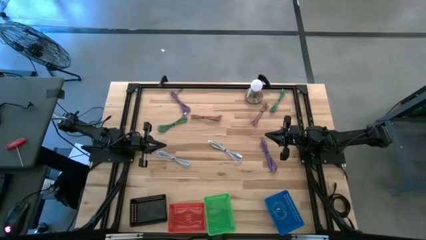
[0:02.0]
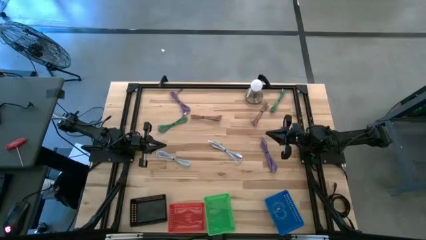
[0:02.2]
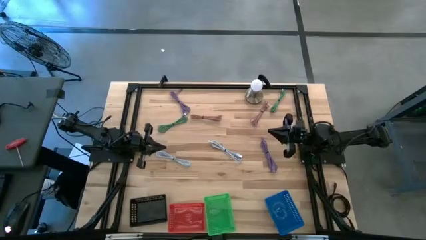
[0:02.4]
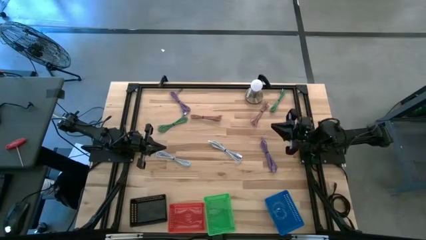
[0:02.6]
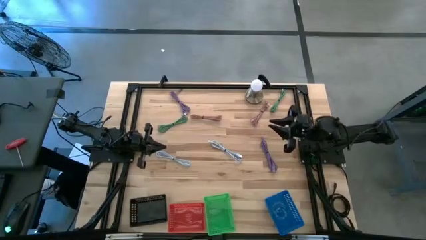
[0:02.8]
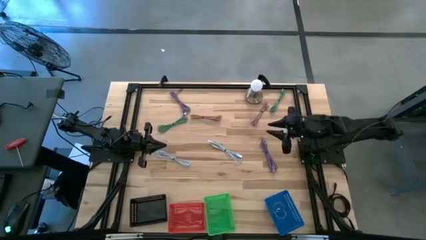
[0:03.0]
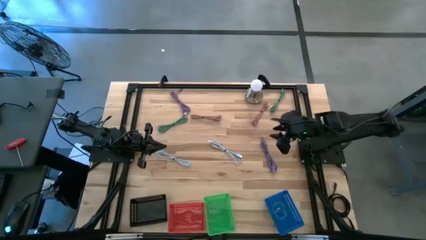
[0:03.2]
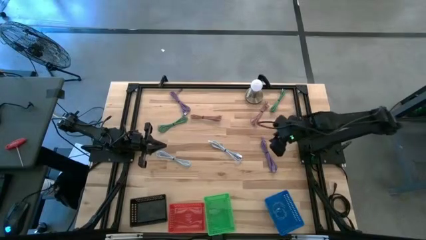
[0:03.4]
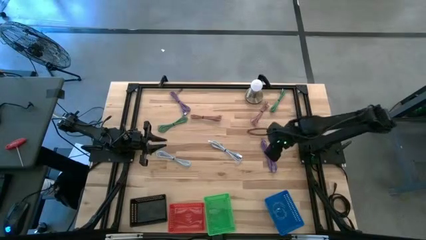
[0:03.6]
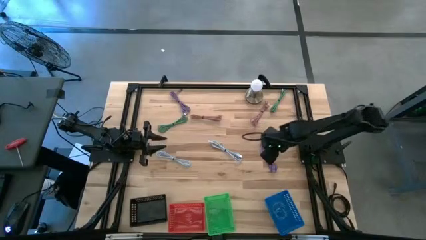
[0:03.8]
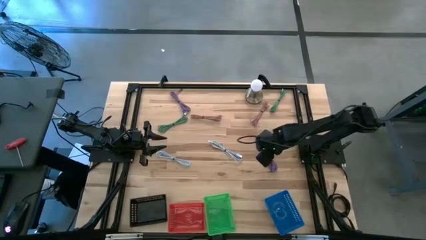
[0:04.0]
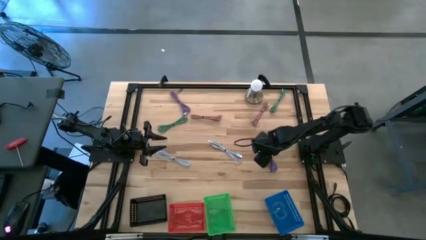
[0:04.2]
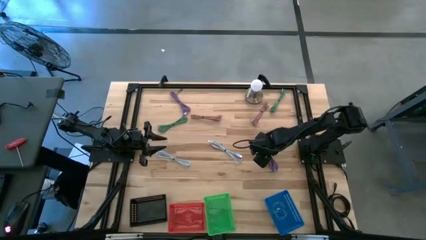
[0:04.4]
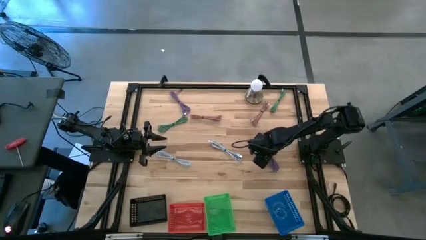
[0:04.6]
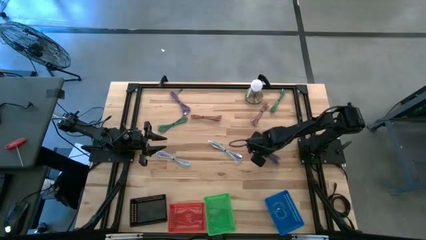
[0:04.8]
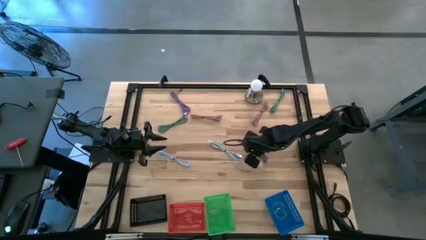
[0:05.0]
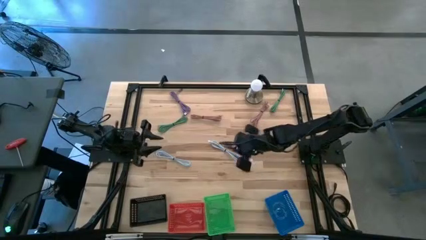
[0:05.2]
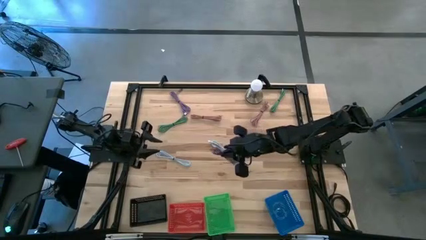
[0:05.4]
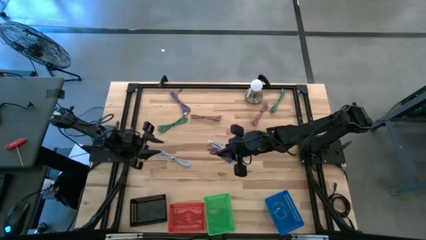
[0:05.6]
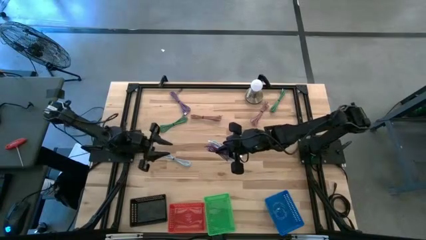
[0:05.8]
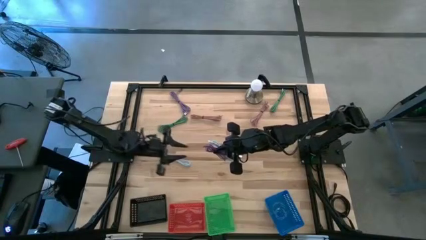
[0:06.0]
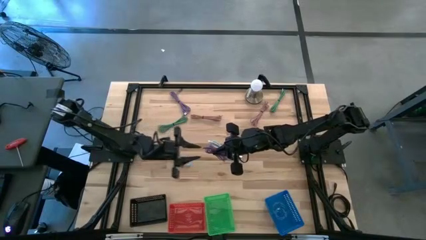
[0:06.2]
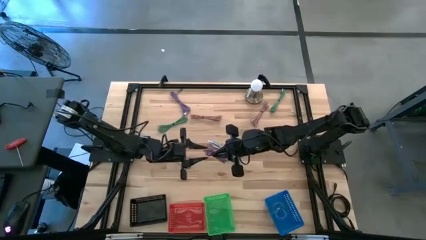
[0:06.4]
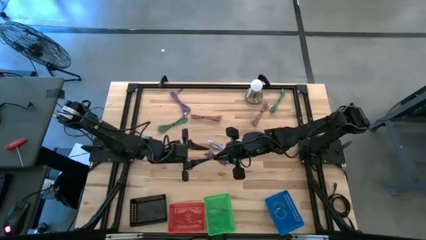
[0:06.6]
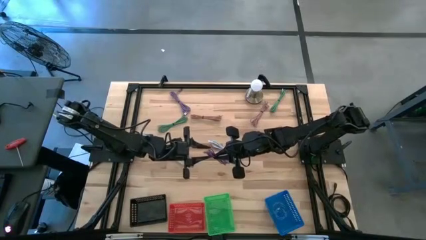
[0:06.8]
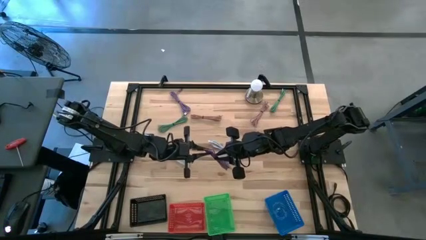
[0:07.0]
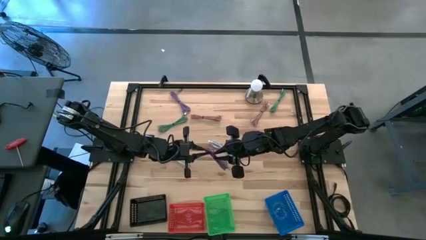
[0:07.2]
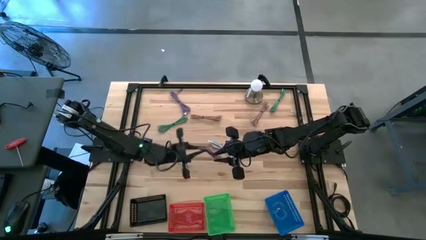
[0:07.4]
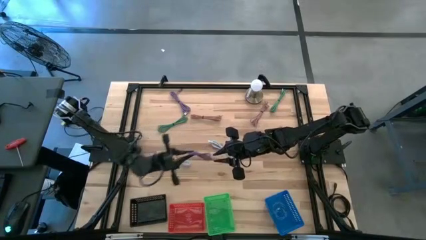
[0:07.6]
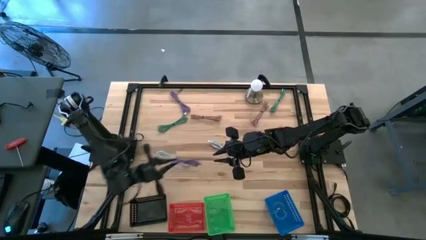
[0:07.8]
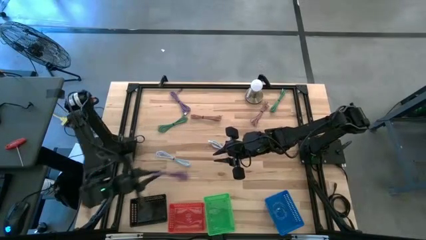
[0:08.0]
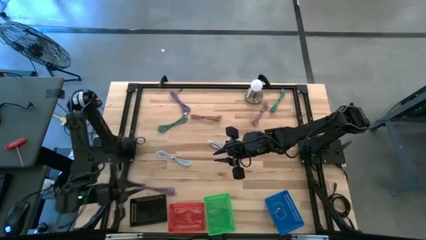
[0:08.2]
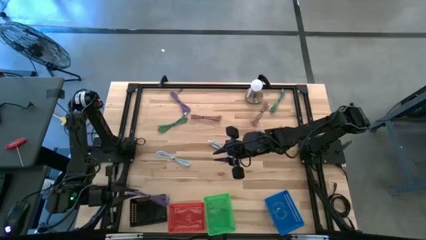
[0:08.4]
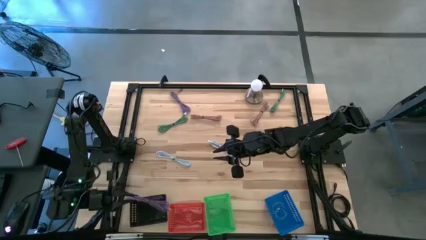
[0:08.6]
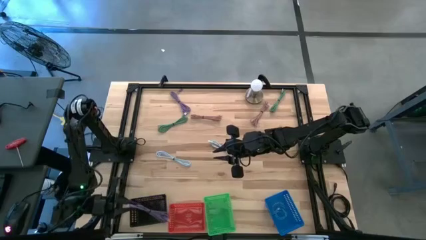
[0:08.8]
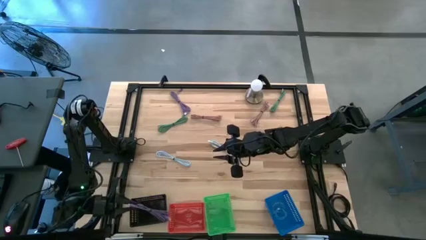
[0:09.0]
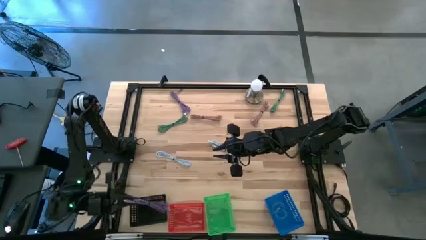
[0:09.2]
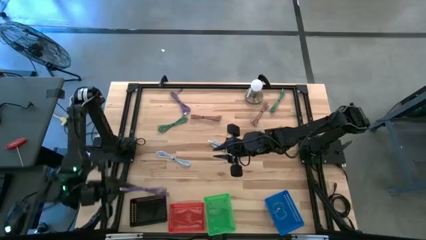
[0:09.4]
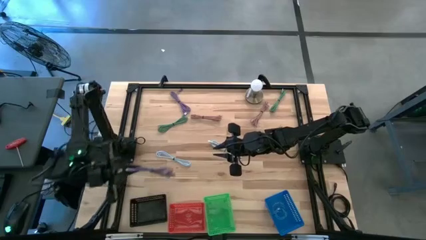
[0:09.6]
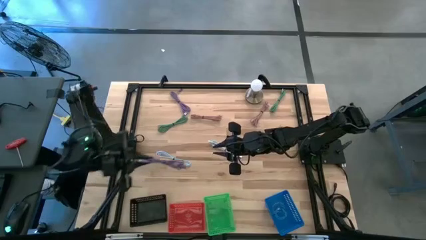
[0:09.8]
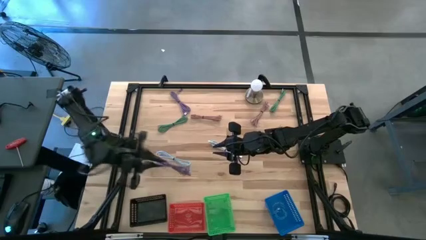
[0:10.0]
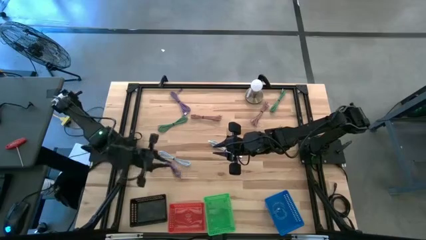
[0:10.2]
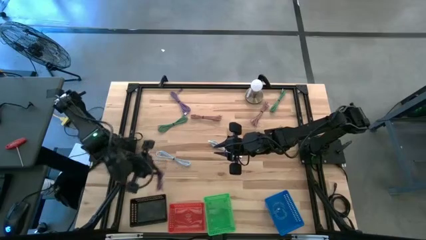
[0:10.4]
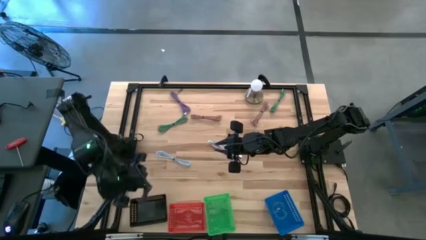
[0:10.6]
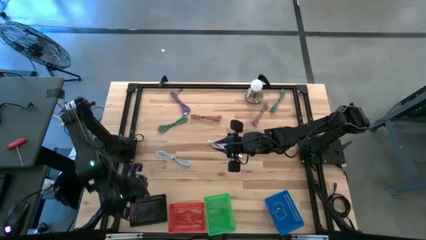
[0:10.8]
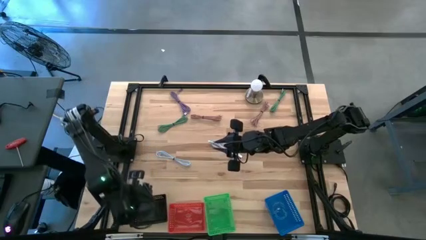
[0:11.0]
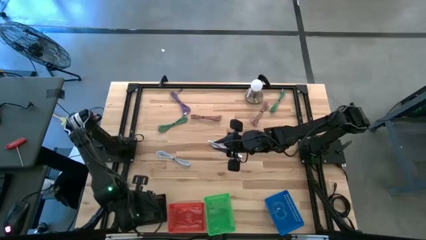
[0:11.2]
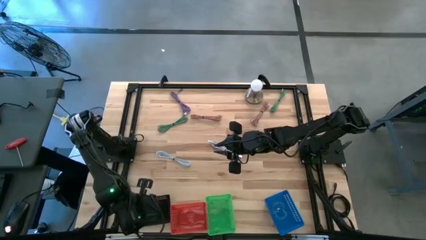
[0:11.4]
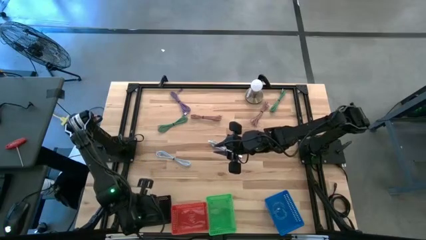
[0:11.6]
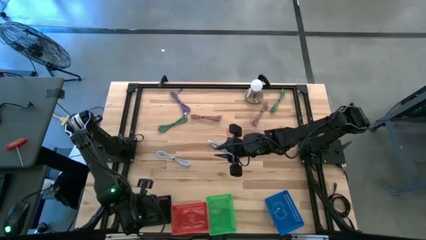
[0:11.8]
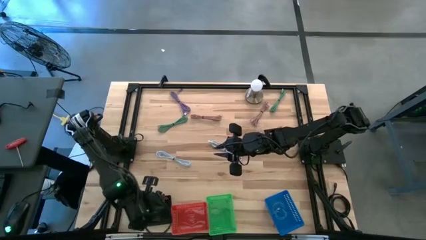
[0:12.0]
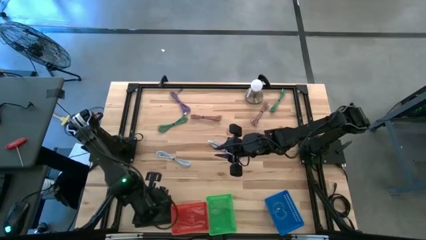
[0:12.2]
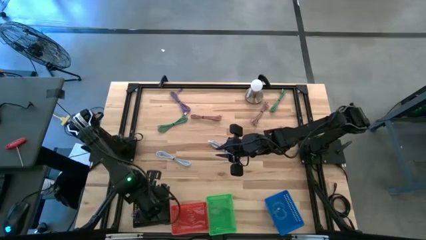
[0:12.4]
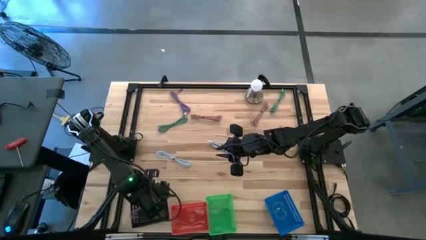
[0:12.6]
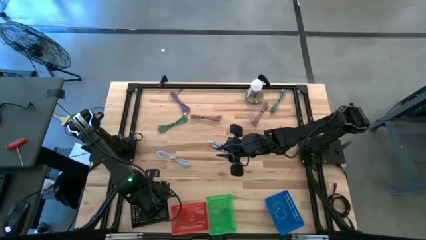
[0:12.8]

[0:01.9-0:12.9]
Task: Pick & Place USB Port
Put the bottom purple charger cable into the black bin

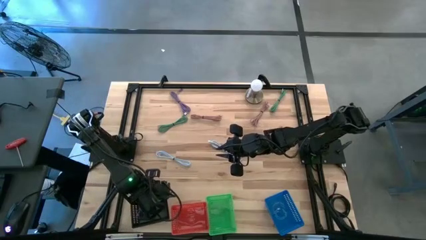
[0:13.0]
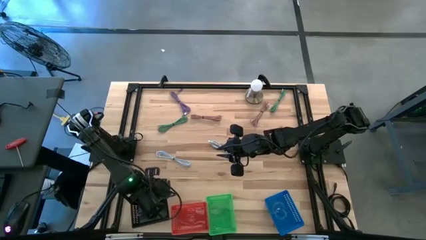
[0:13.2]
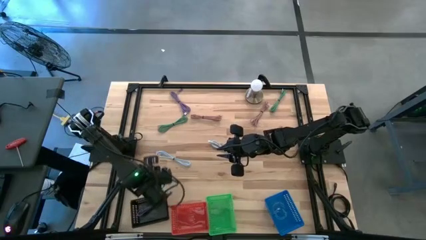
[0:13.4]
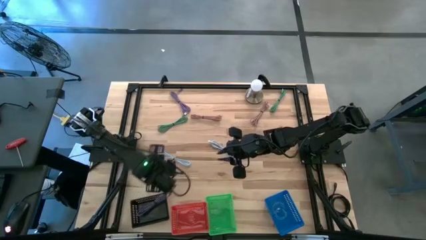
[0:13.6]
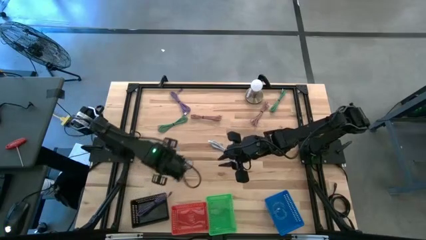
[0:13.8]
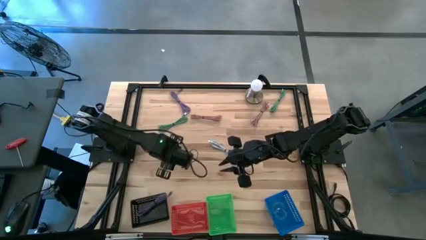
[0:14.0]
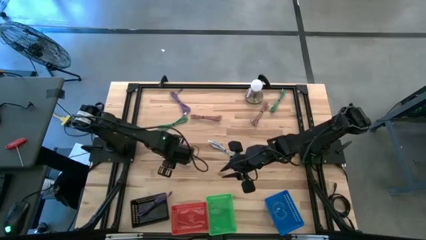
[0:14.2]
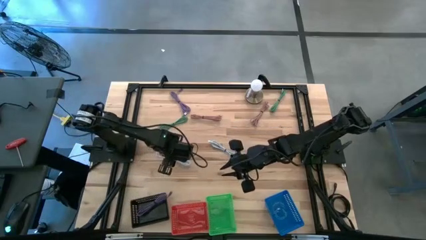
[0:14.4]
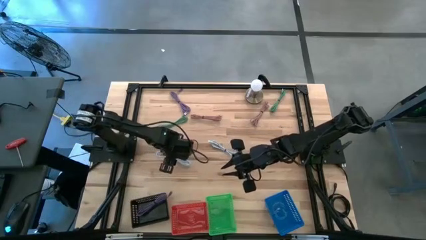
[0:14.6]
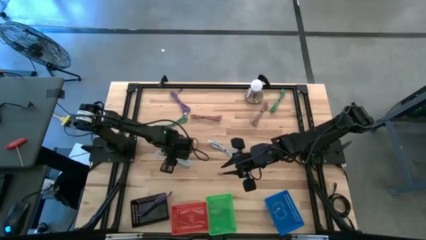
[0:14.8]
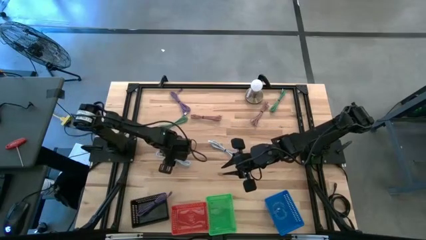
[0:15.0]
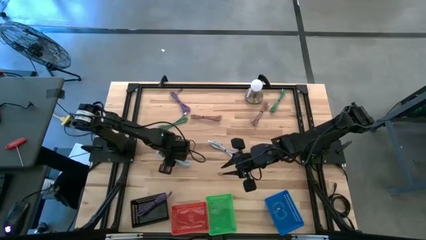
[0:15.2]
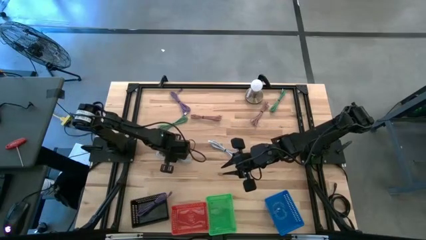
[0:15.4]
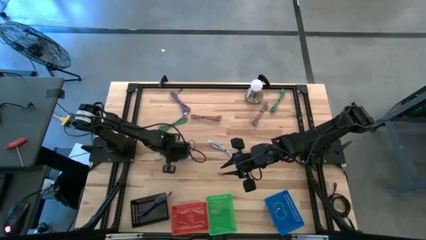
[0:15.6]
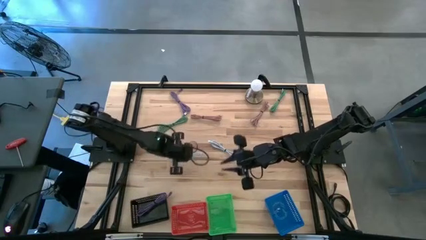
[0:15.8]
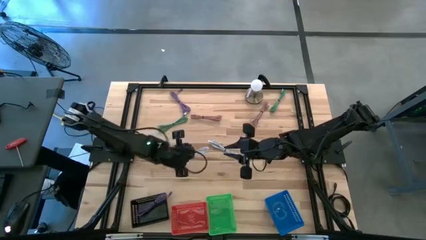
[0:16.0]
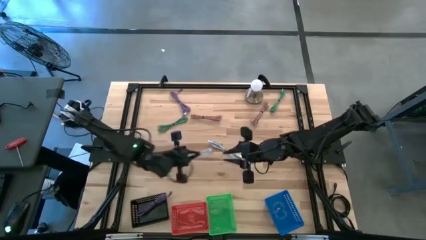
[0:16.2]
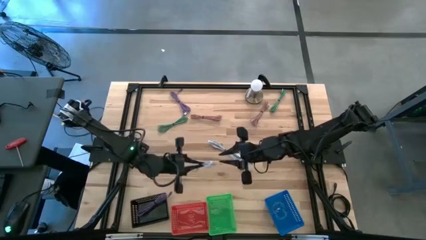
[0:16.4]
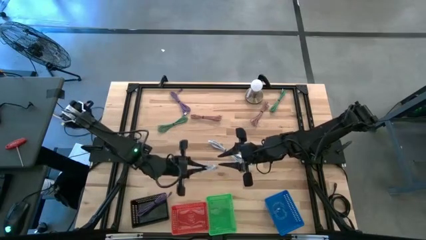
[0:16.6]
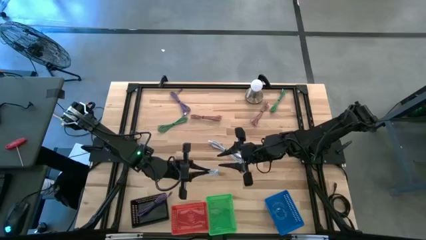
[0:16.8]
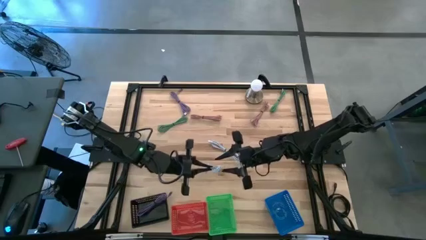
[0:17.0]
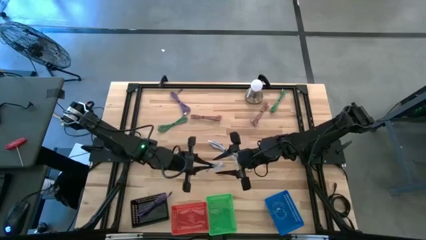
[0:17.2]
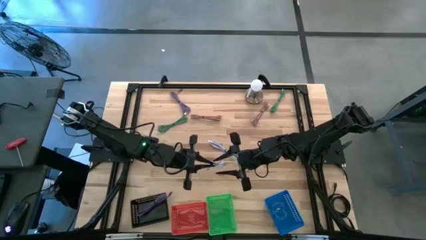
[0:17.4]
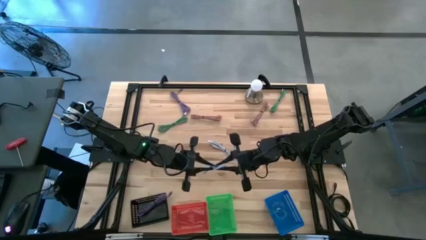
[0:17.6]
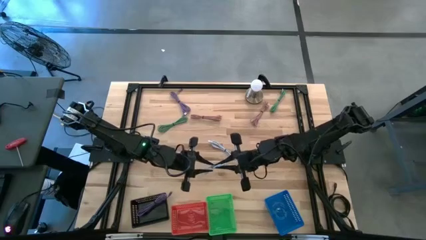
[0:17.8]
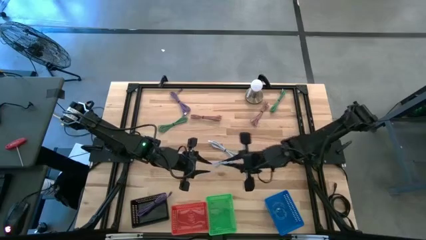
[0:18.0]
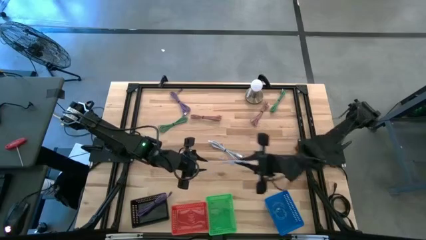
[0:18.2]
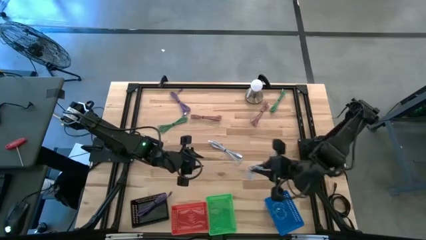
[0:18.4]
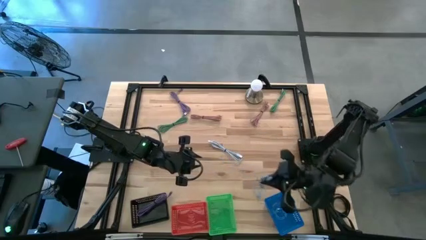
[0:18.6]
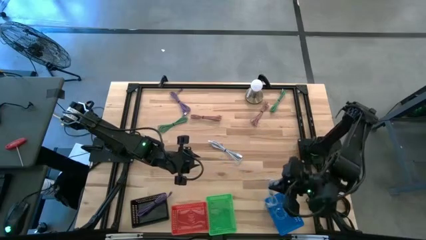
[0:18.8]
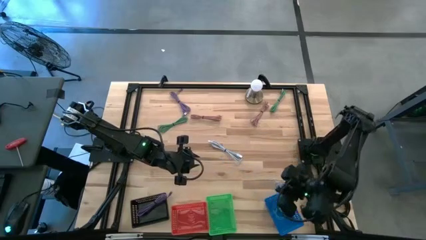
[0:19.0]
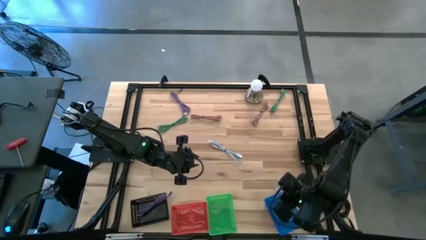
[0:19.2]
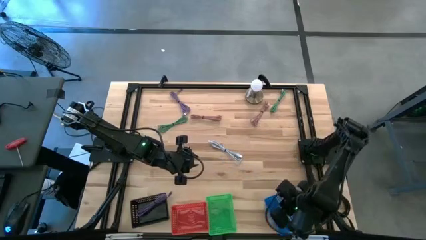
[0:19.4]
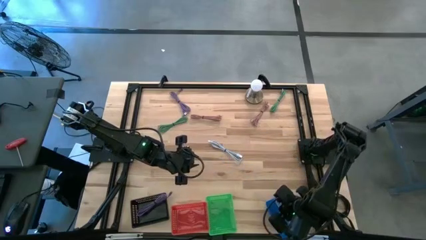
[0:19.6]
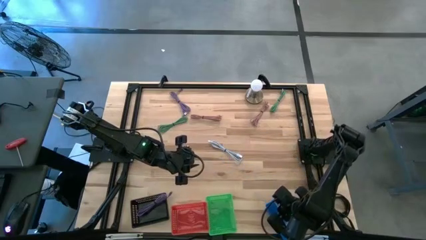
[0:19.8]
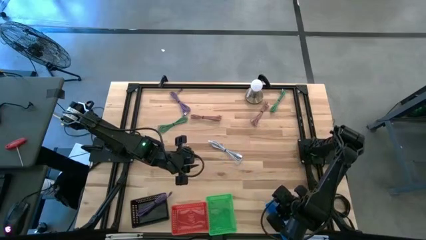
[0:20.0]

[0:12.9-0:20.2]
Put the left light blue charger cable into the blue bin
